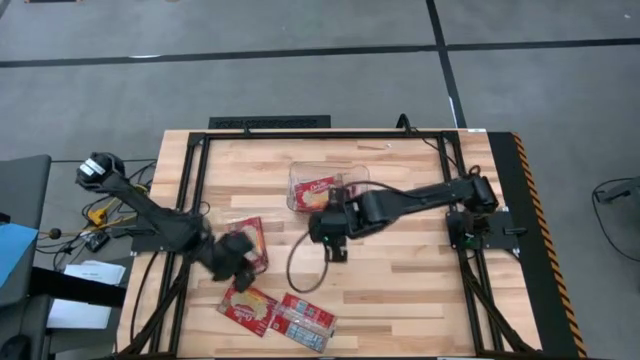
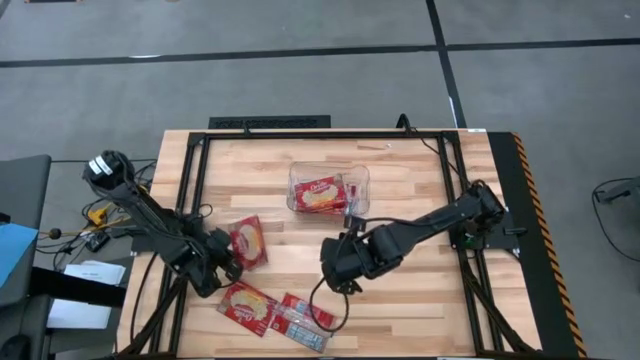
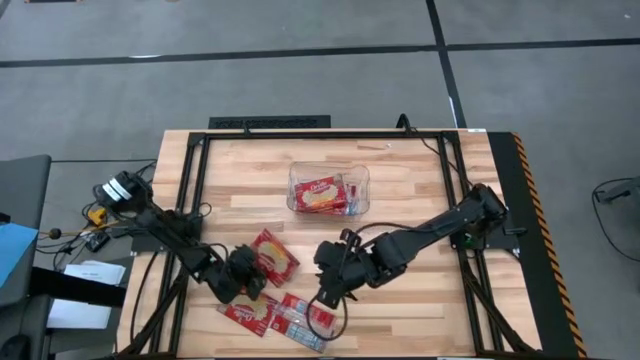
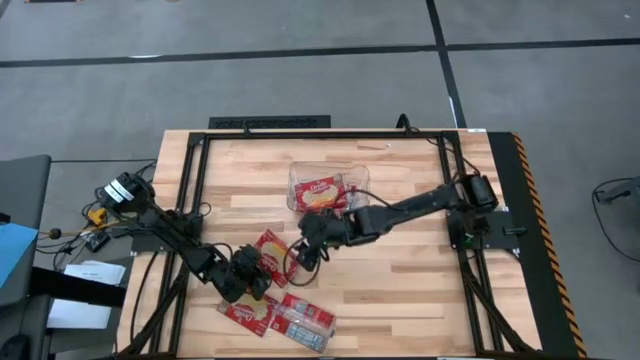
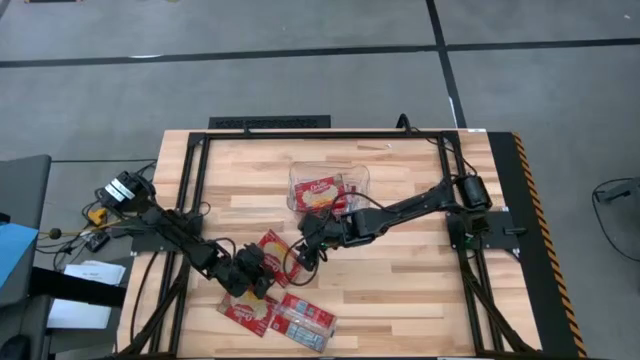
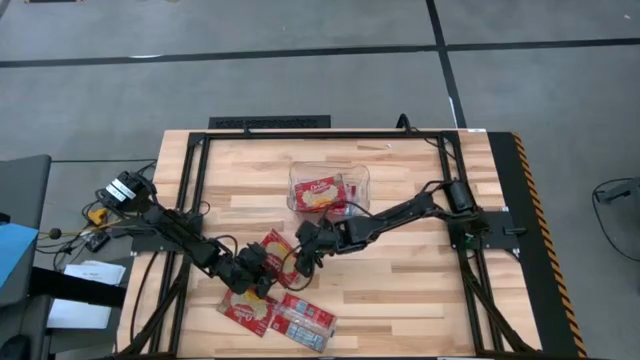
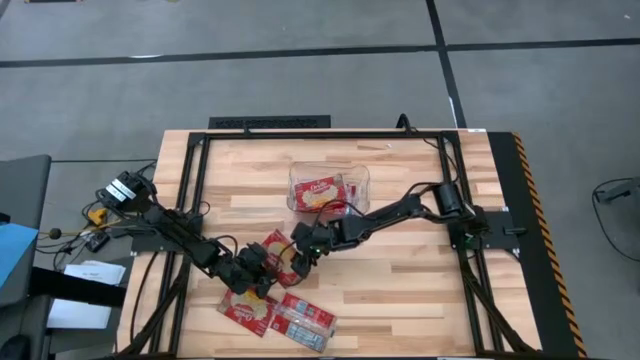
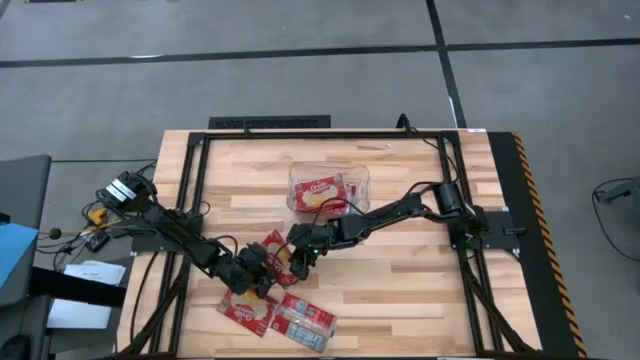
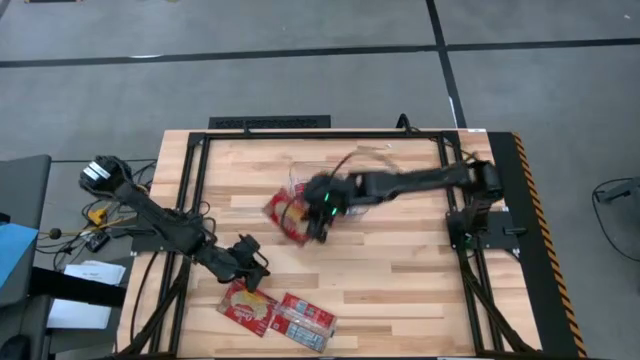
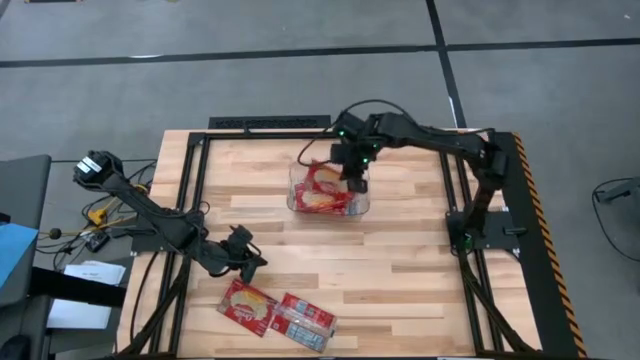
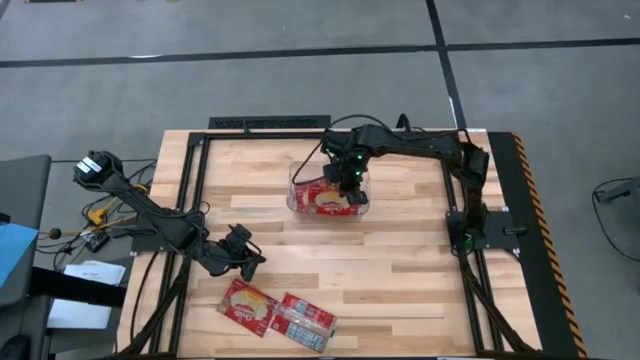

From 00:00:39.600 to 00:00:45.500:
Task: Sort popcorn bags into baskets
Put the red popcorn bag into the transparent bin

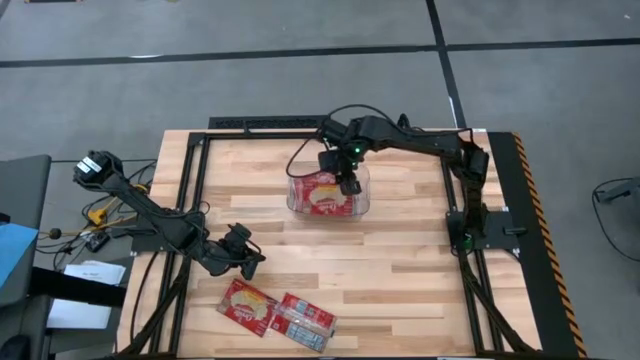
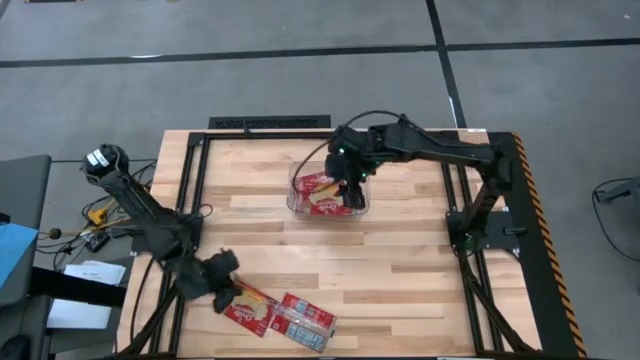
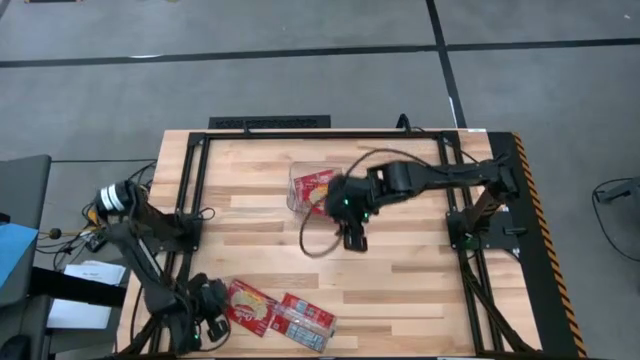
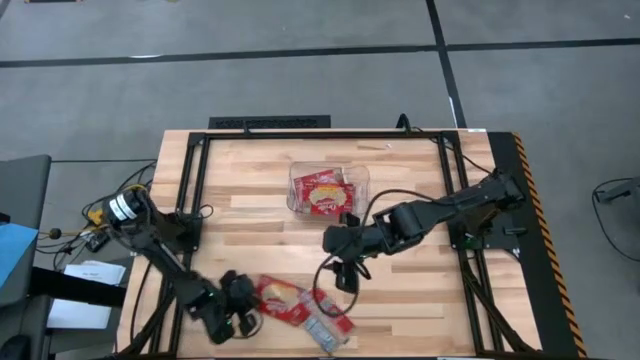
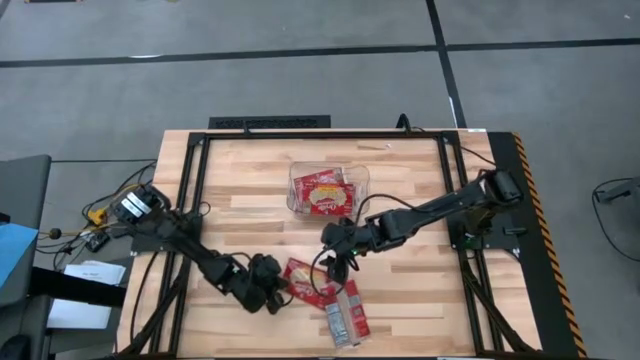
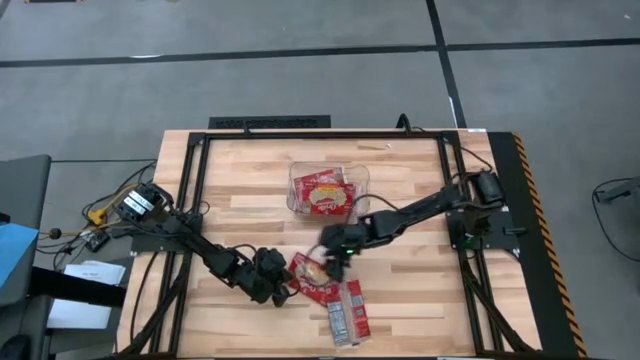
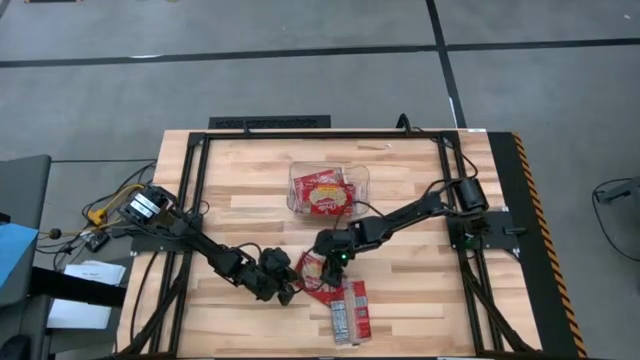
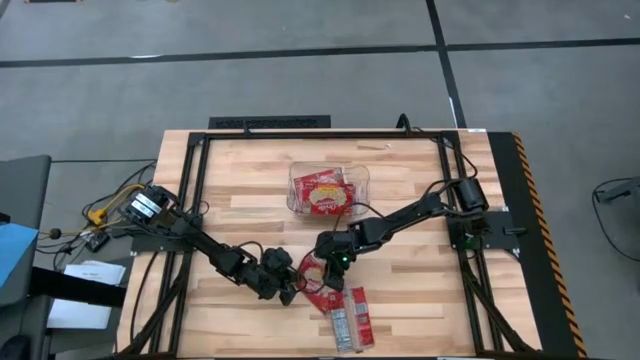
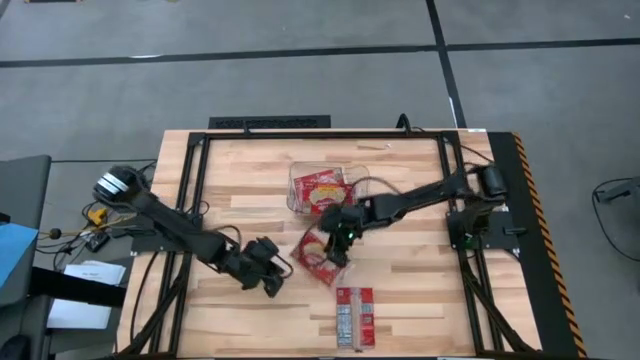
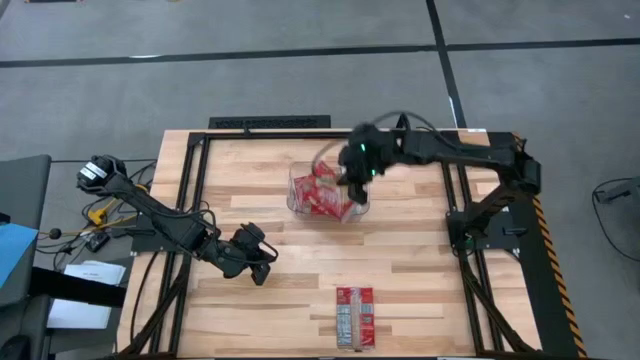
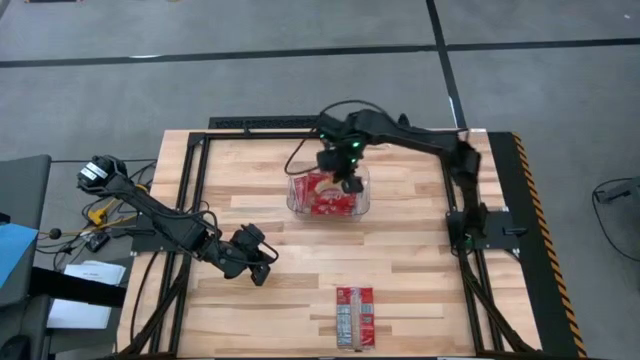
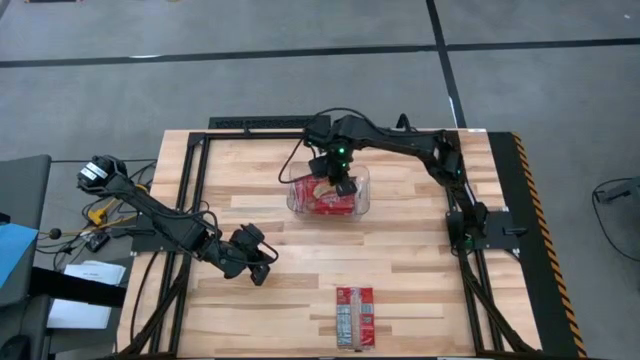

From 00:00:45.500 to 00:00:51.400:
Put the red popcorn bag into the transparent bin

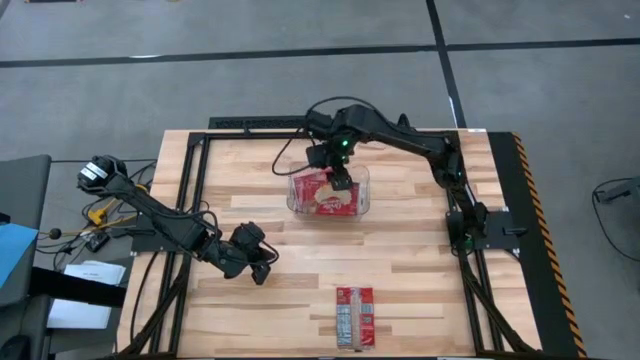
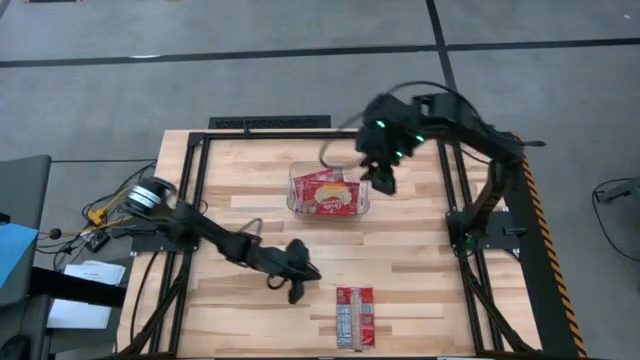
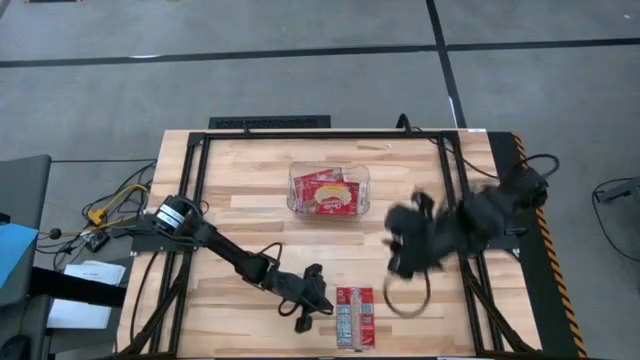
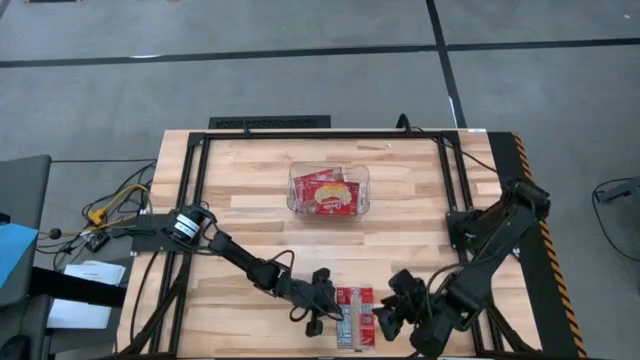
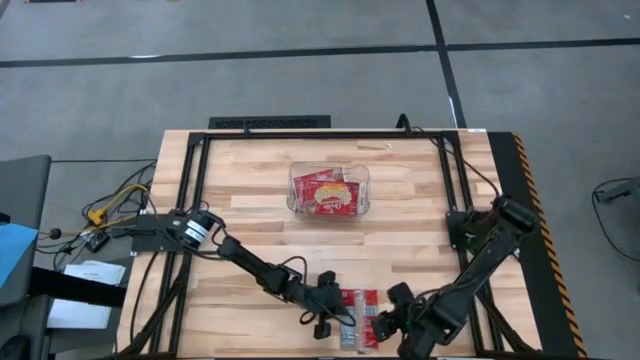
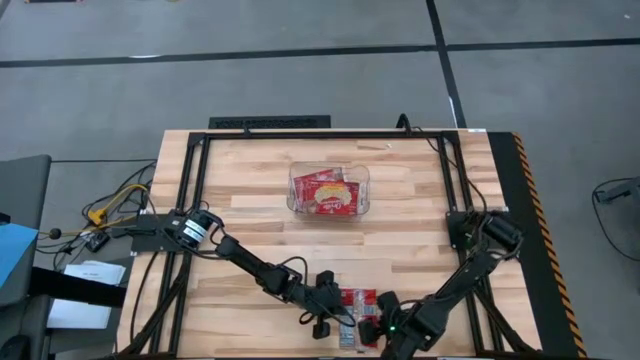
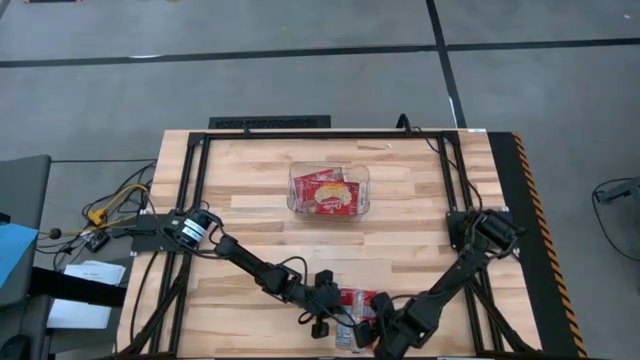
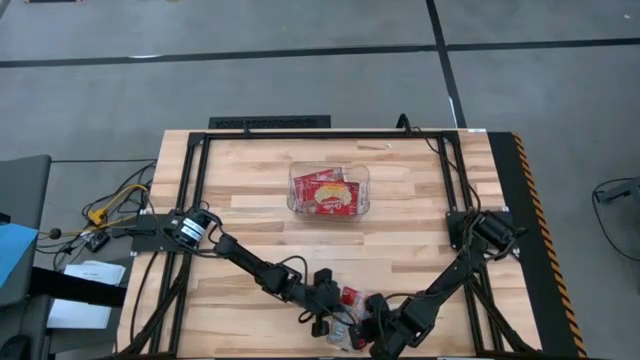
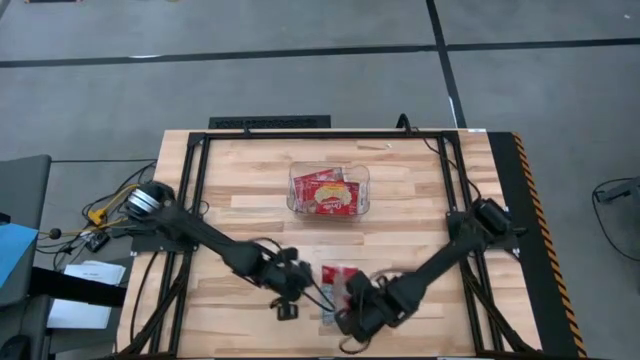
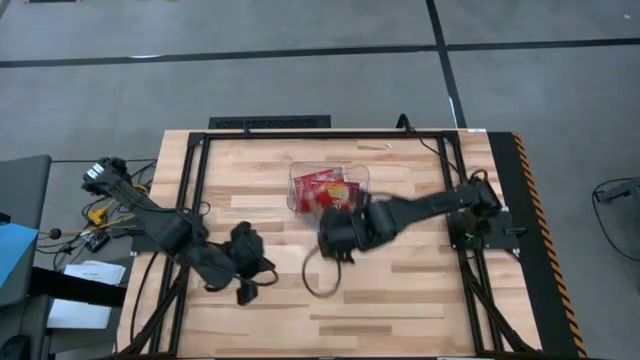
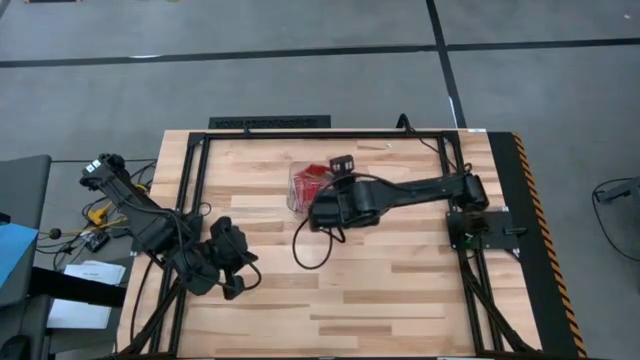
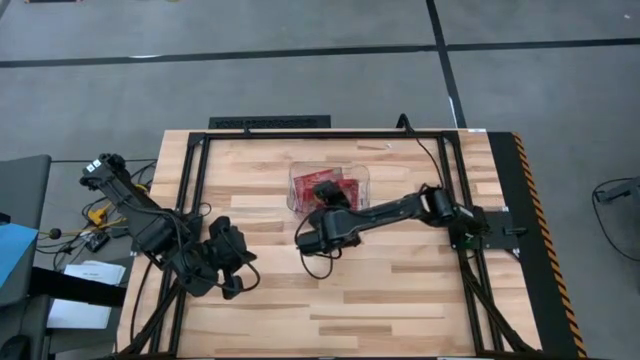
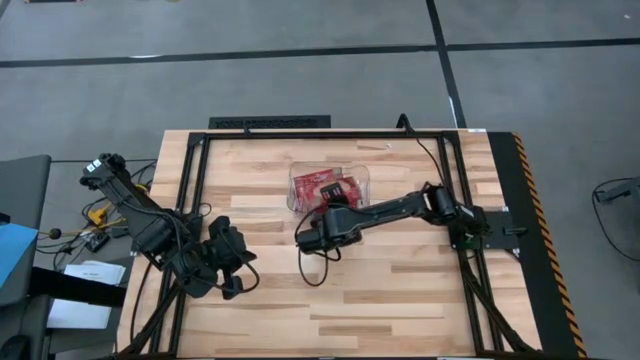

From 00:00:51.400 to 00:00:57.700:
Put the red popcorn bag into the transparent bin

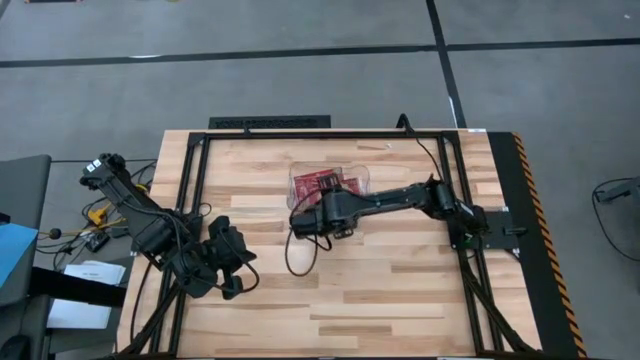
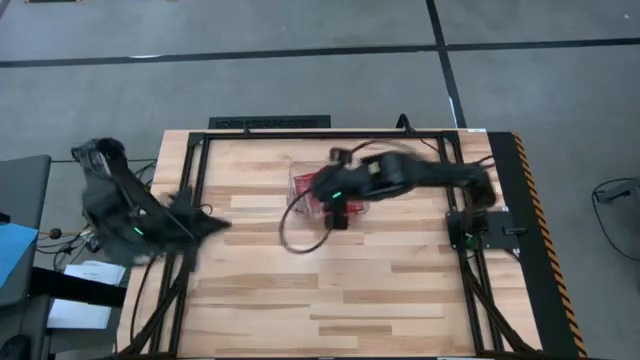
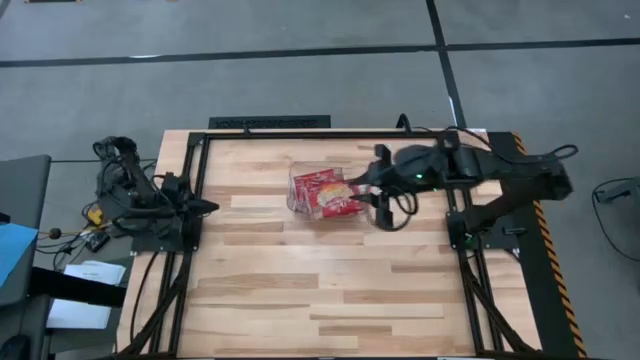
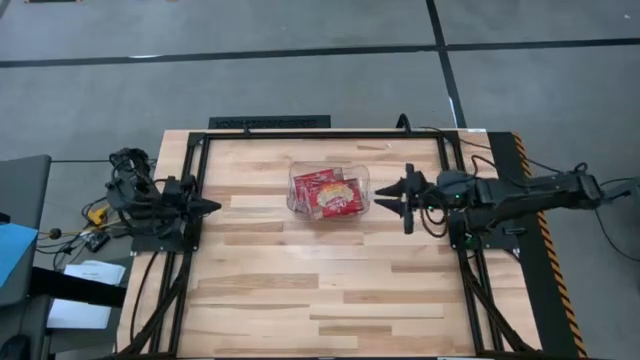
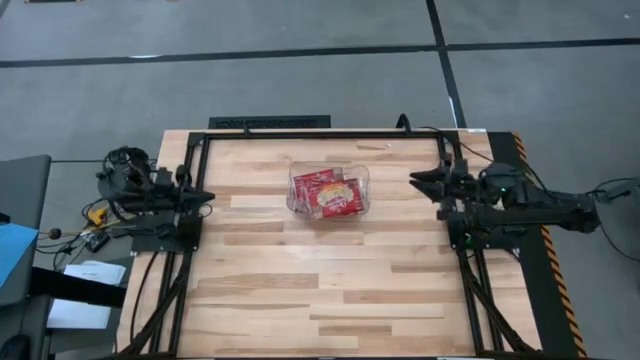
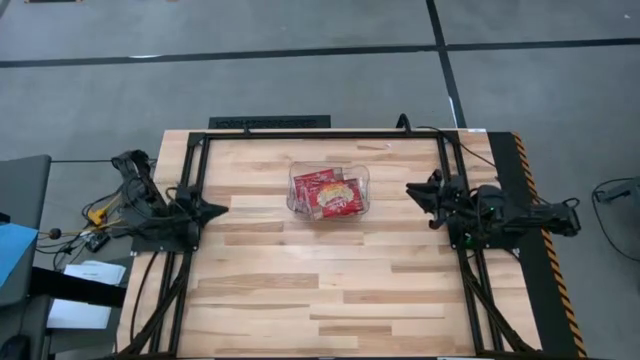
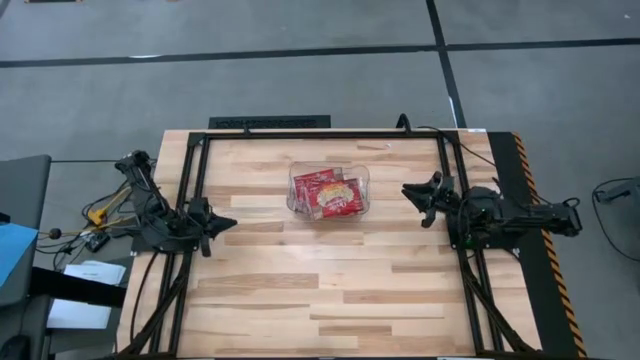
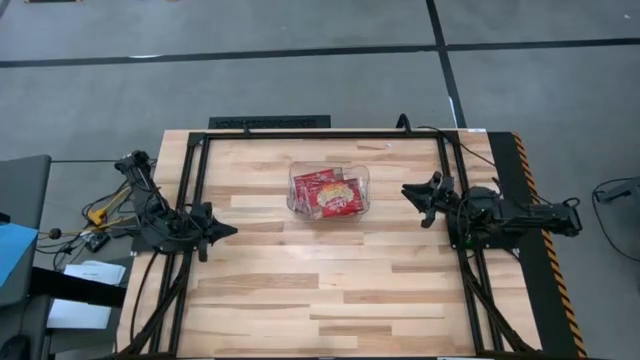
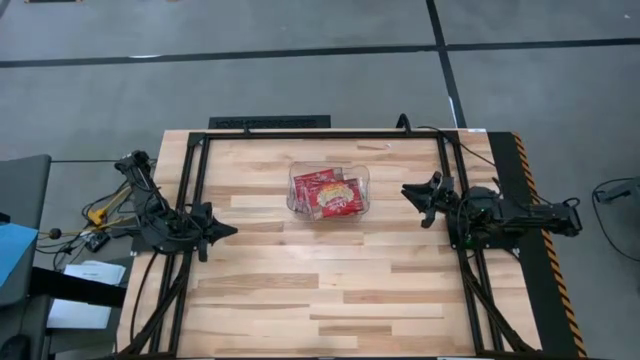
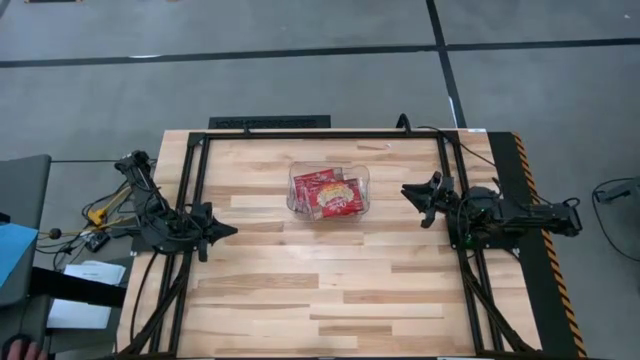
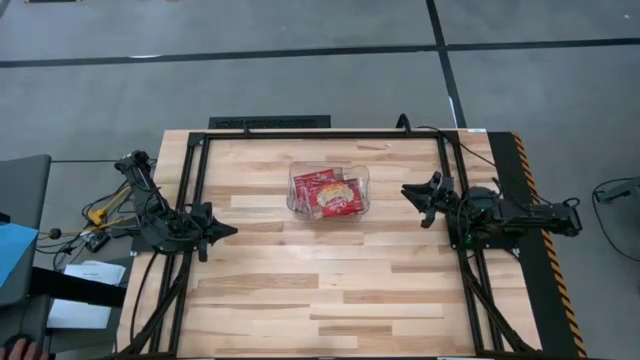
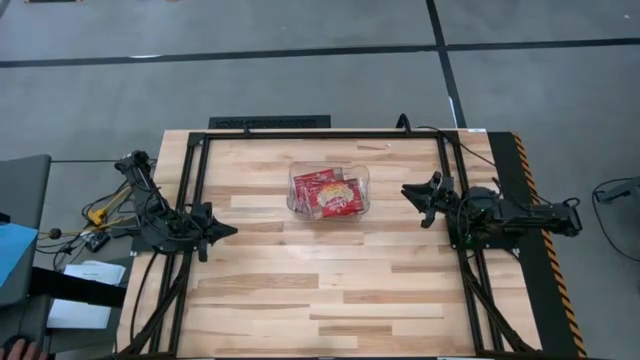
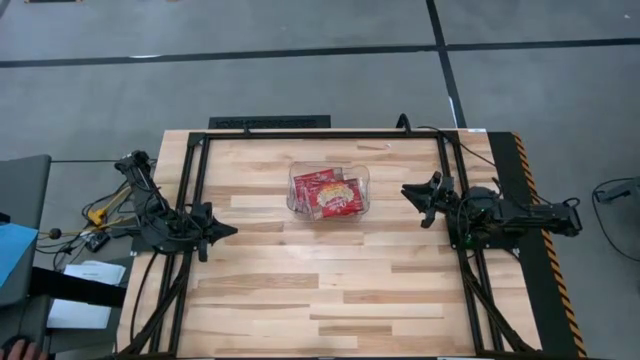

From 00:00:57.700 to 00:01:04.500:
Return to Home Position
